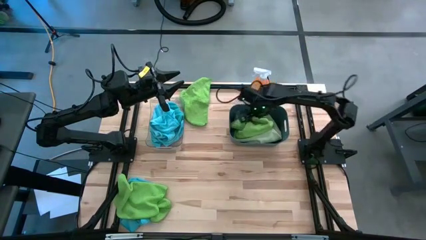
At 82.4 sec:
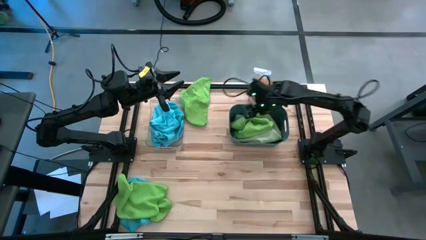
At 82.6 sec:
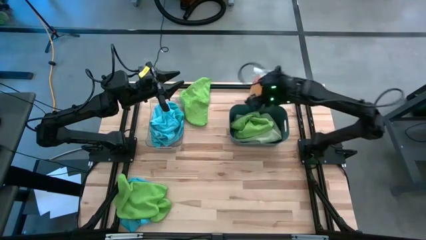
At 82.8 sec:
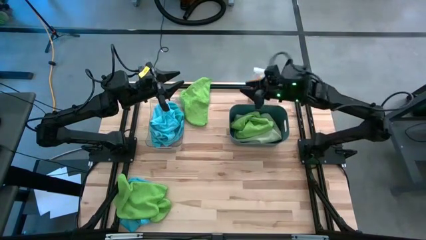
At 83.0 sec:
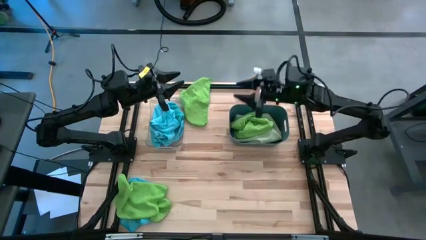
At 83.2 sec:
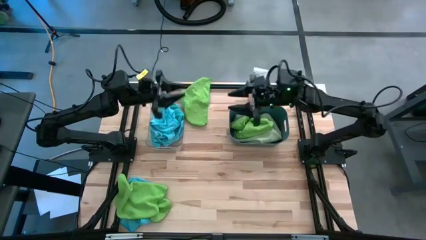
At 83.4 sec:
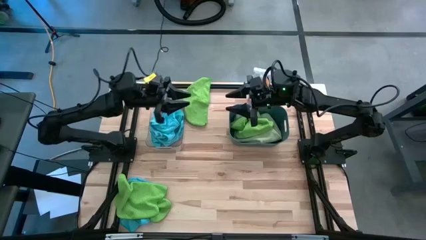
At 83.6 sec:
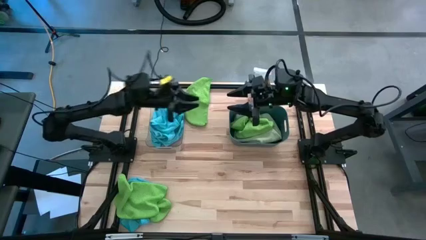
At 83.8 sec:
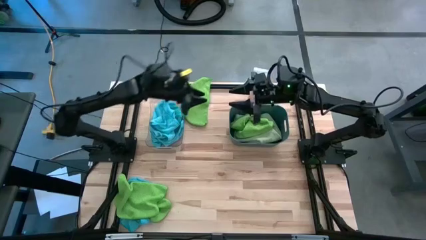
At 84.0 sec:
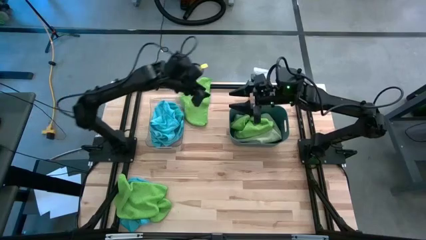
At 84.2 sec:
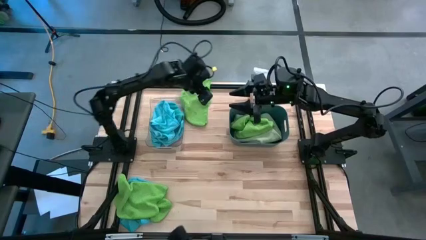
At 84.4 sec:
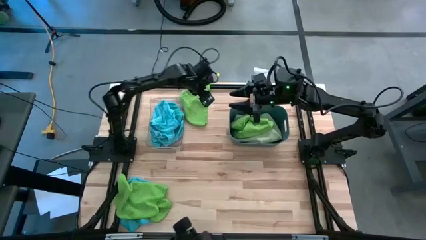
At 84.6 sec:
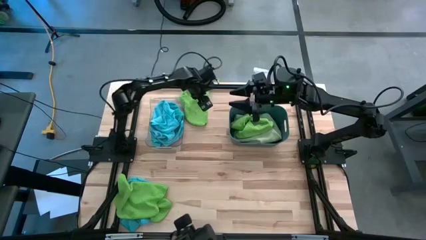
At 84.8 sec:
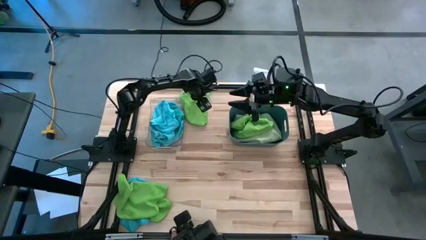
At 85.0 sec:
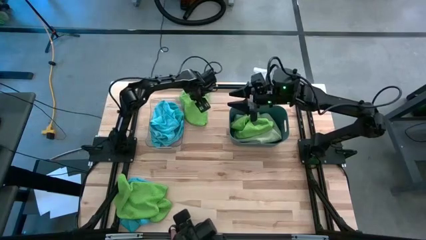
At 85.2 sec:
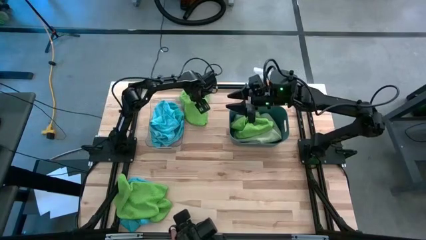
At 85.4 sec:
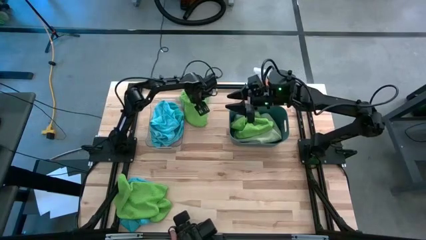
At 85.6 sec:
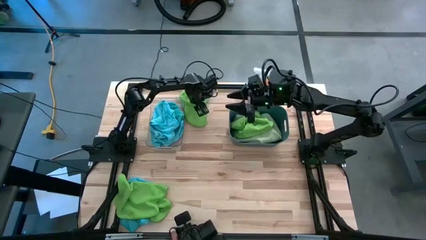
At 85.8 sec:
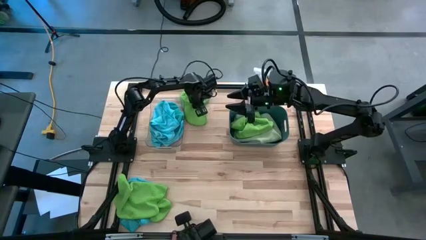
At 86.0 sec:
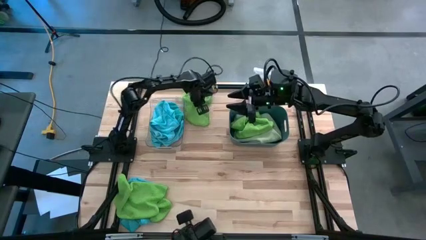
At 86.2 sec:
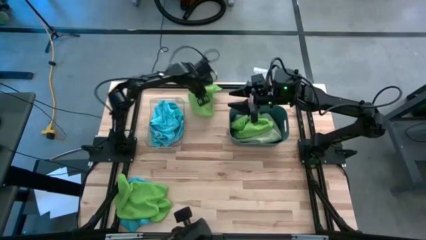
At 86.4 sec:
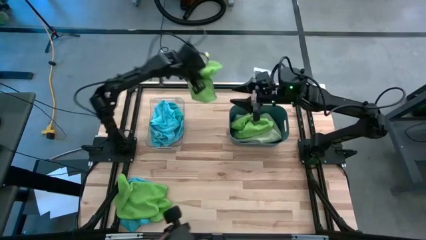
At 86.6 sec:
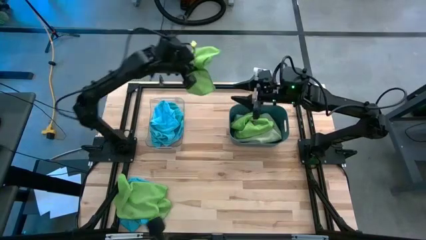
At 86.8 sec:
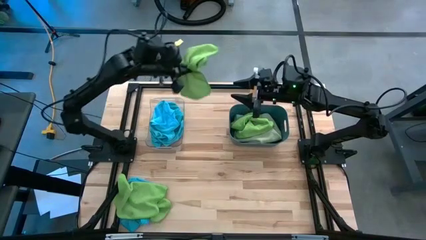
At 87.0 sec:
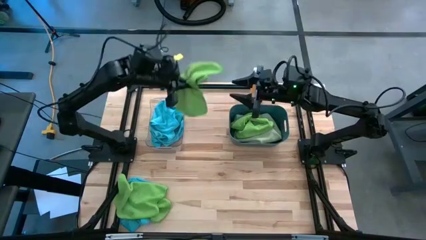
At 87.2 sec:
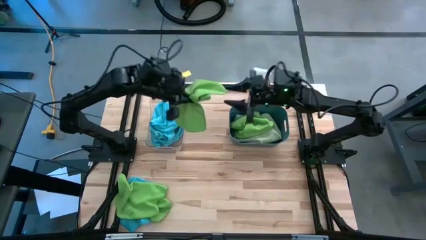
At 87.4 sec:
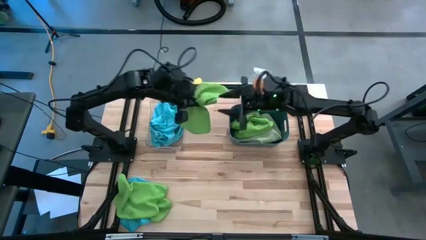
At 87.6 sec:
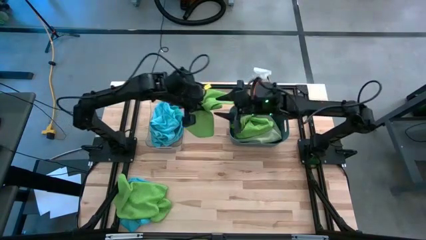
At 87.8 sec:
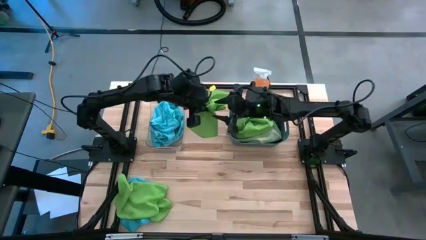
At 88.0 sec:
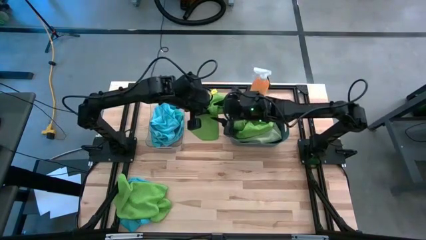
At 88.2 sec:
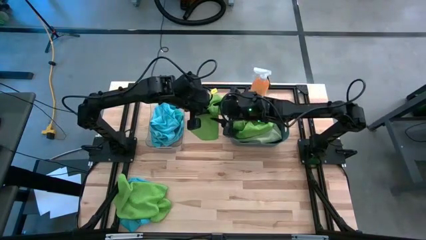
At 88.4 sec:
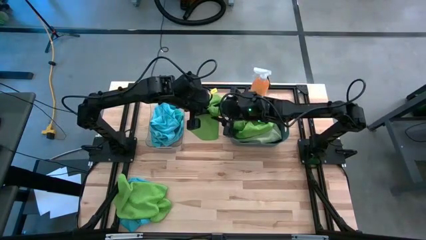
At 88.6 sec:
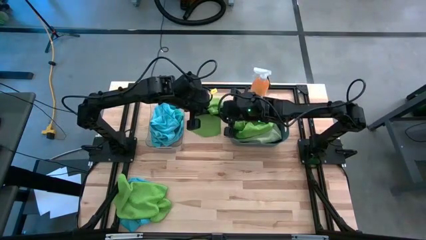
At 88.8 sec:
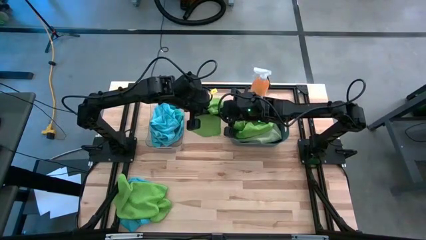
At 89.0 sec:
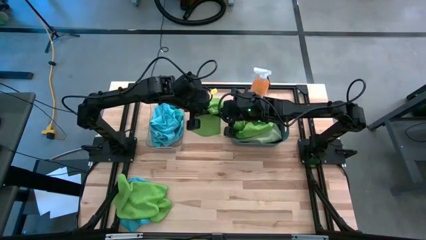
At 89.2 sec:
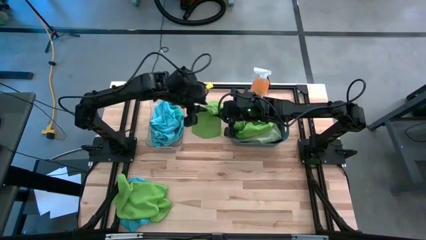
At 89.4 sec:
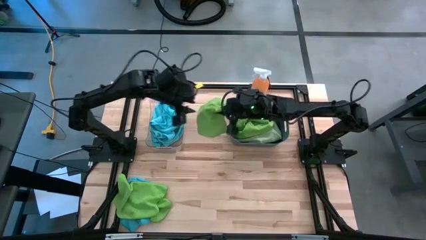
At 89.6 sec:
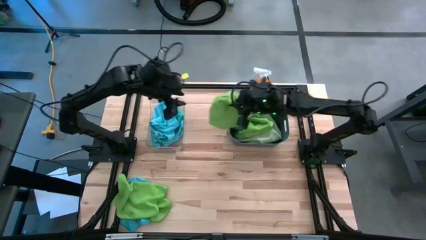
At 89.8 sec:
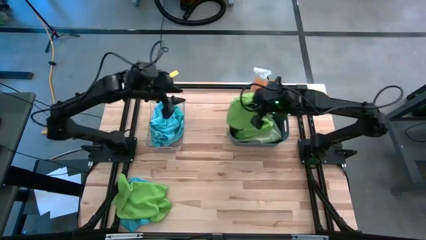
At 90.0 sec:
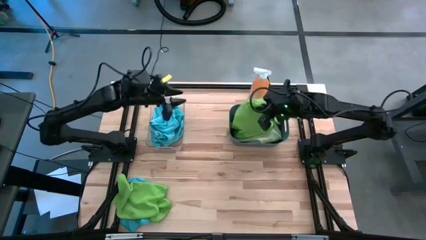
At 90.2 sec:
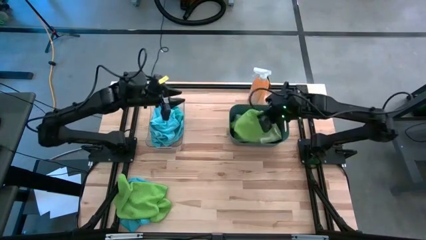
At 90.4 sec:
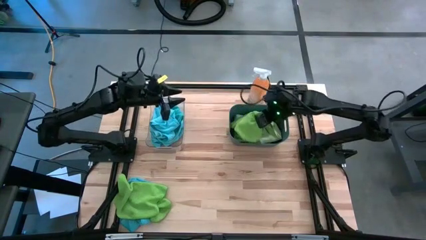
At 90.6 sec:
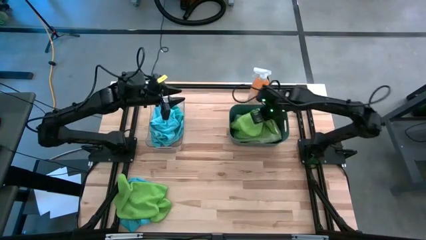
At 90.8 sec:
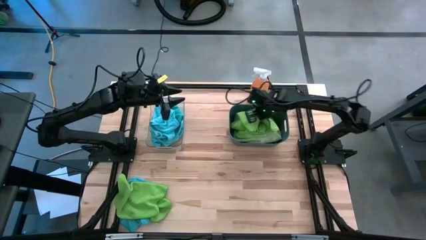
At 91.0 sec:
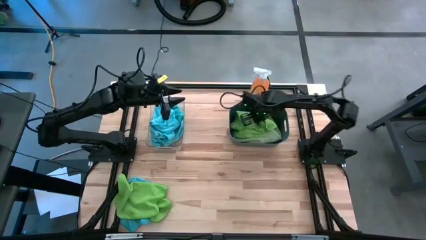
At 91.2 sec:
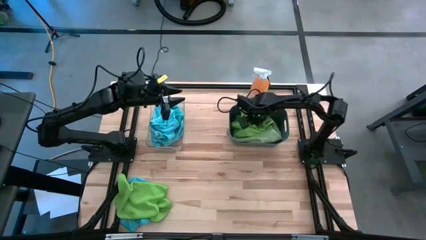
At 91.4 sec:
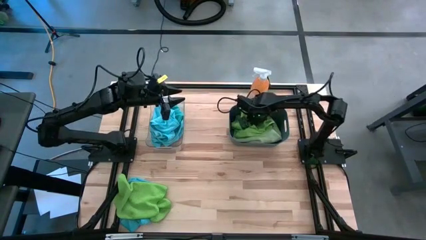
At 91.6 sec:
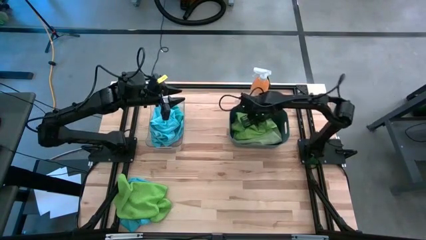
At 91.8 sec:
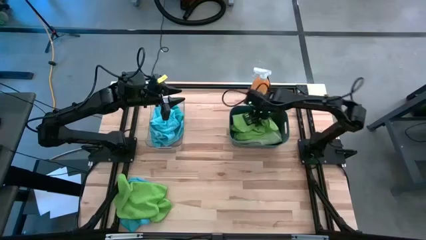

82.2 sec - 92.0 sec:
Task: Sort microfiber towel by color & place in baskets
Put the green microfiber towel into the blue bin

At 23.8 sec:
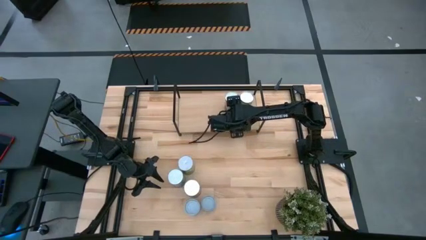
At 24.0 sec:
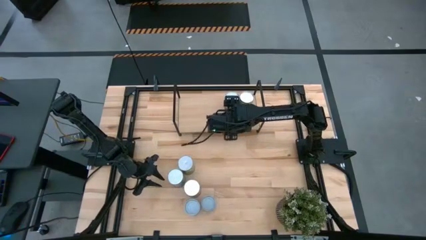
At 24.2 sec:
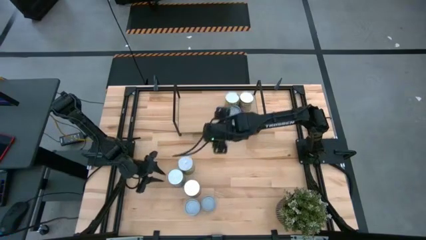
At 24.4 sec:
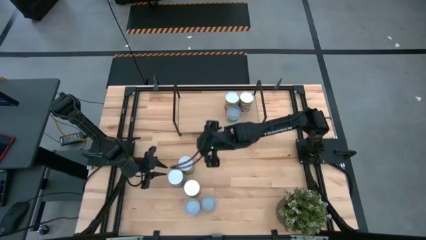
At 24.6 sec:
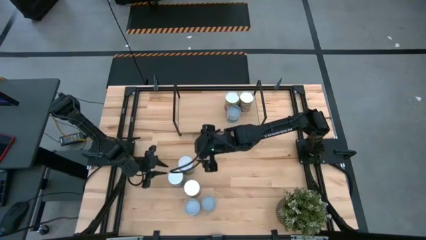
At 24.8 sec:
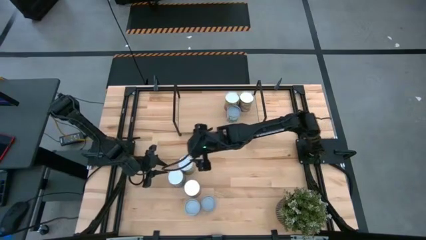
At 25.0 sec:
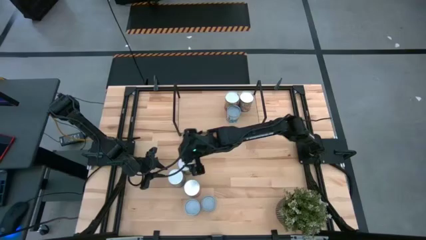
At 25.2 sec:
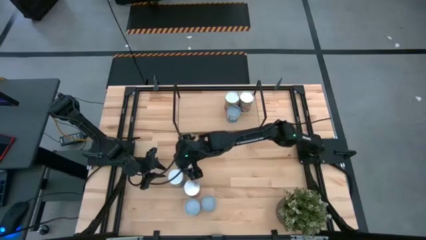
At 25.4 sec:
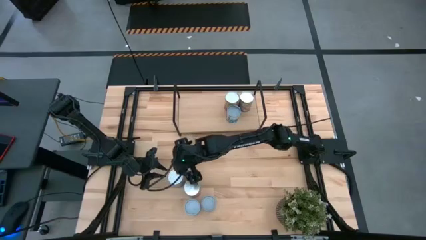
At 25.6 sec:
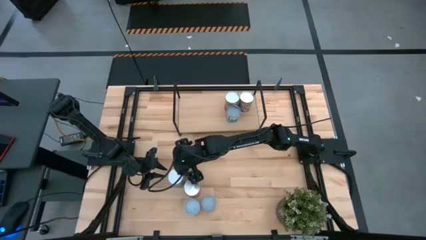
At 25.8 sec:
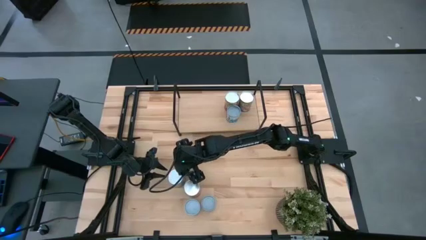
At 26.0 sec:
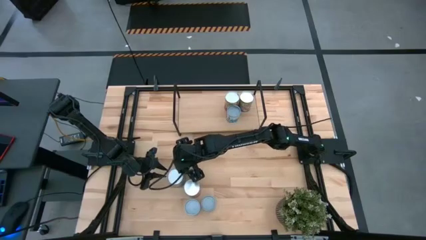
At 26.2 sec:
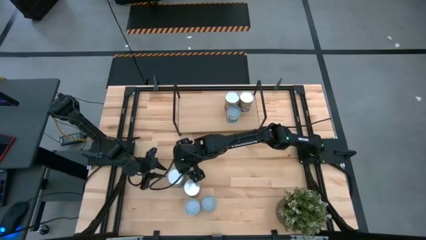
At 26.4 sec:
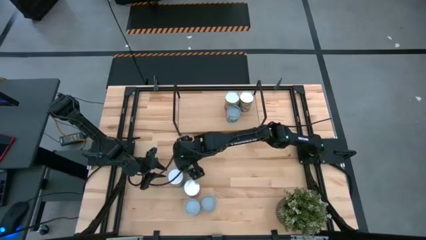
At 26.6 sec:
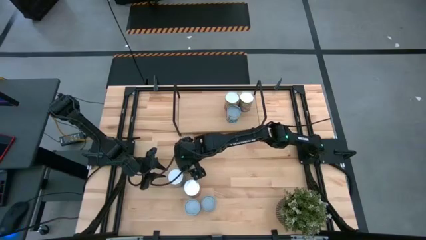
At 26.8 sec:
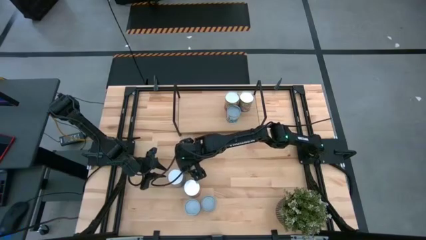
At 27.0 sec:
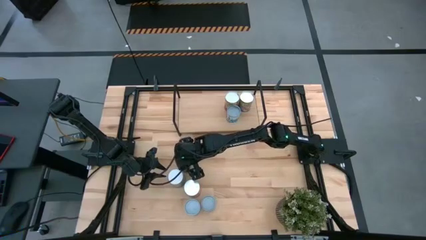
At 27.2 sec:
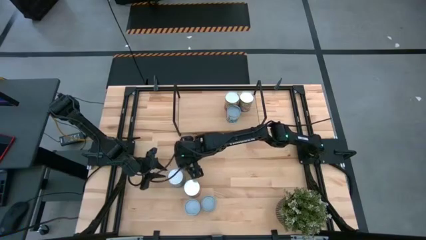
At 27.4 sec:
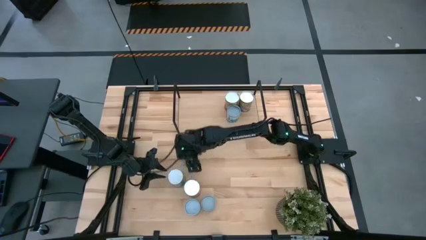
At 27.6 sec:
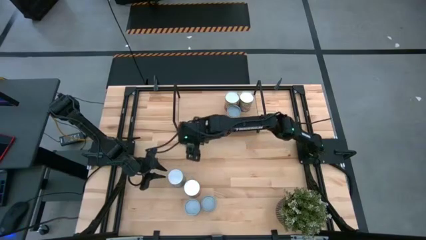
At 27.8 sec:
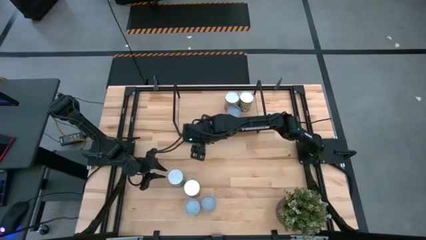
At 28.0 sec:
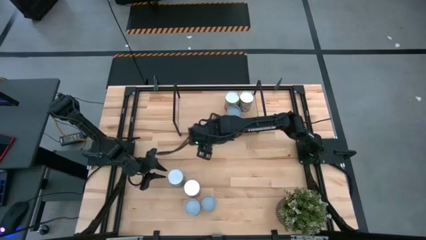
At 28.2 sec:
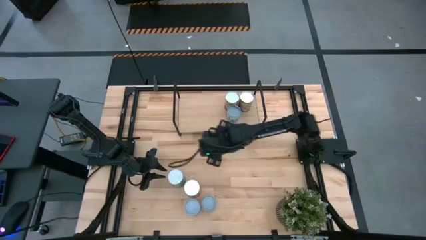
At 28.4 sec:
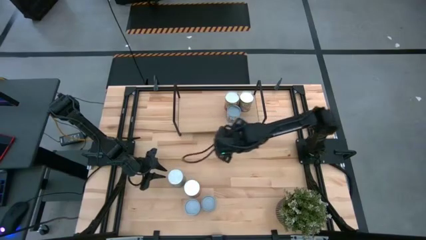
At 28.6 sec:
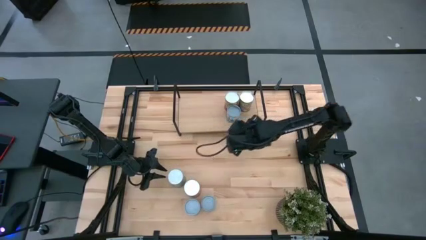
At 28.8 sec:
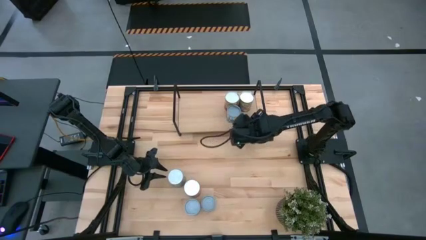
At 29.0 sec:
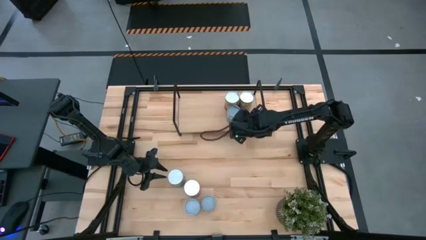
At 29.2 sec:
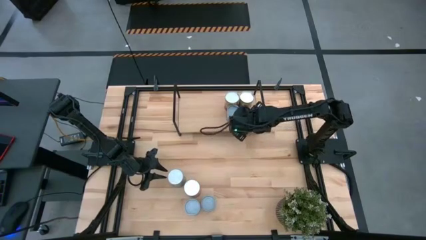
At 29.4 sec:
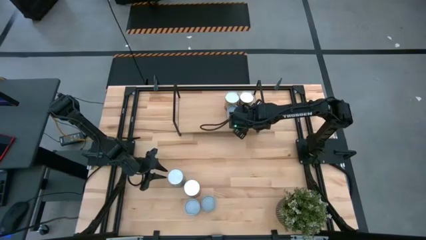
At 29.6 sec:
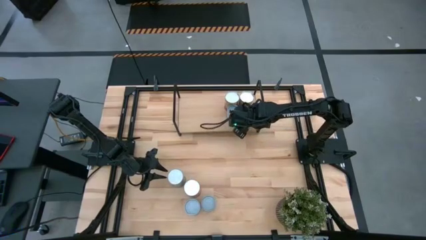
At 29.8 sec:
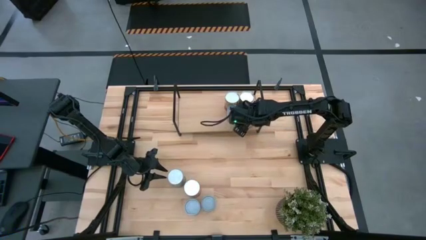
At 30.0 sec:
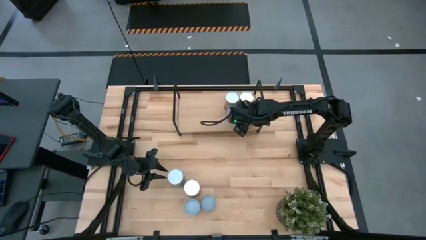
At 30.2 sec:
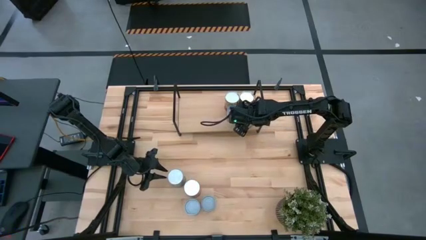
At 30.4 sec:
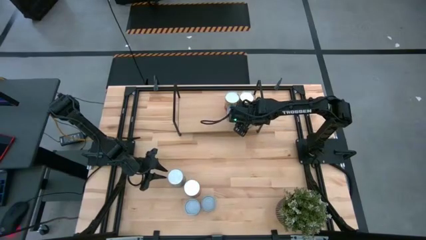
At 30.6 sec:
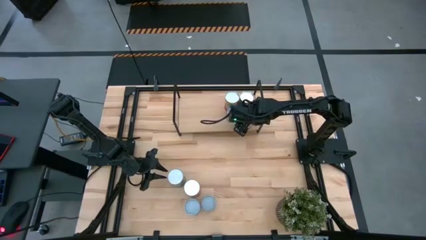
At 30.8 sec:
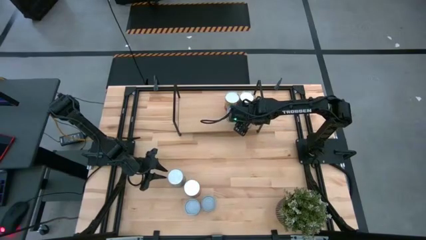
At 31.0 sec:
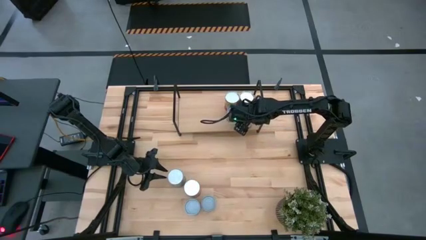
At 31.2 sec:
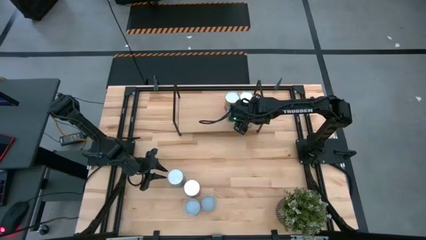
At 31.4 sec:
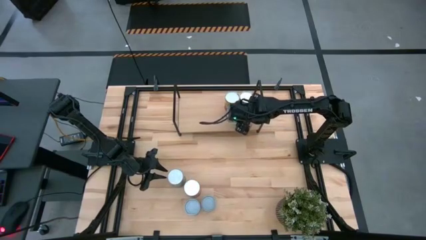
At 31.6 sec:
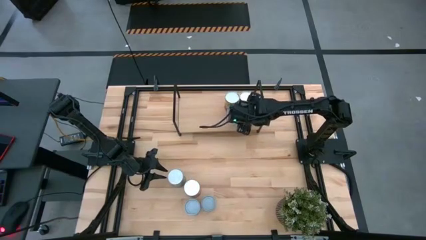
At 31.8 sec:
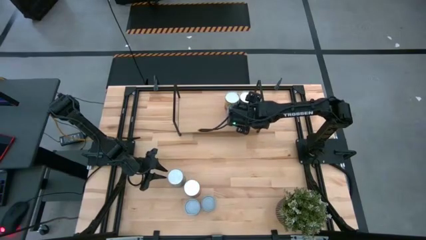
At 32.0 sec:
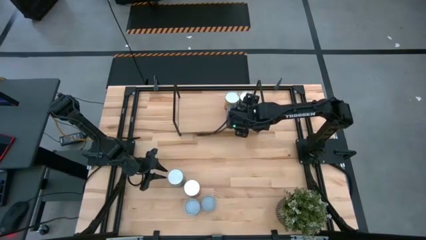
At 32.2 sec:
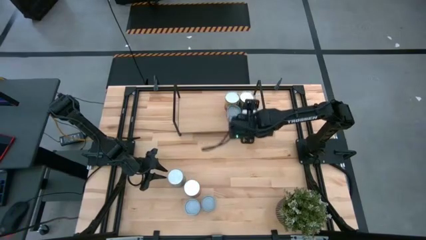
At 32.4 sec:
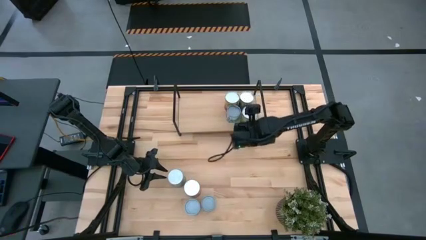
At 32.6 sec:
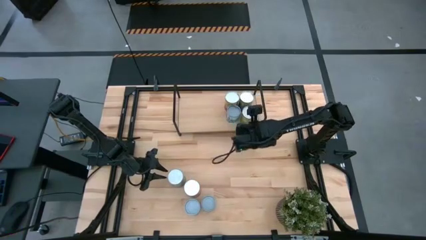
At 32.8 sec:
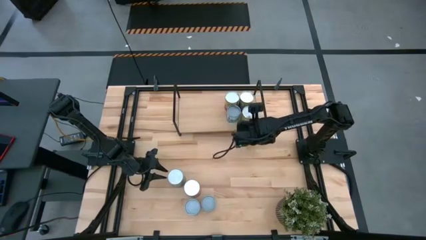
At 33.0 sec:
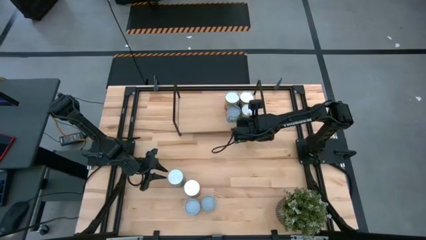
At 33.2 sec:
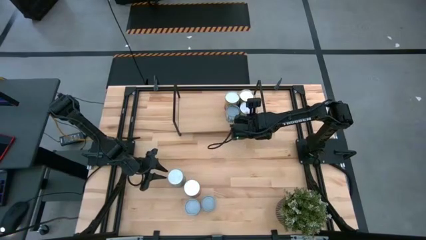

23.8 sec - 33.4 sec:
Task: Pick and place cans onto a shelf
Put the canned oranges on the shelf
